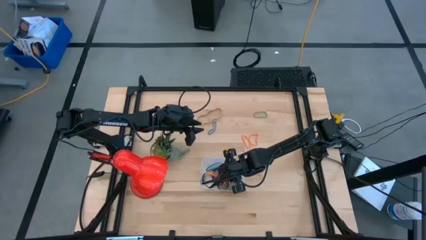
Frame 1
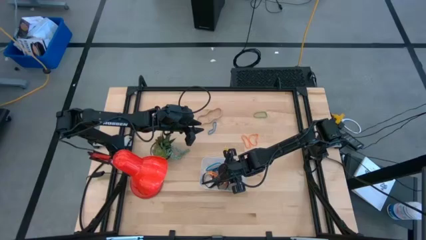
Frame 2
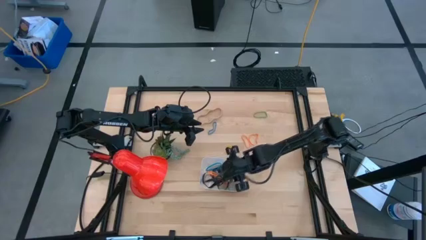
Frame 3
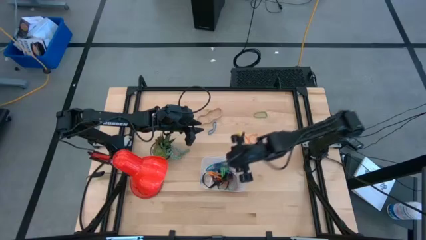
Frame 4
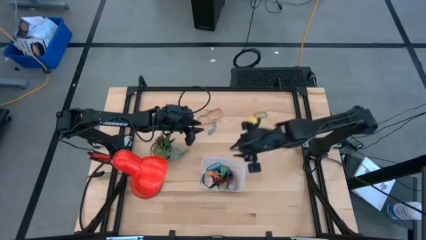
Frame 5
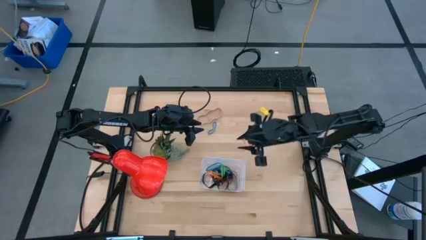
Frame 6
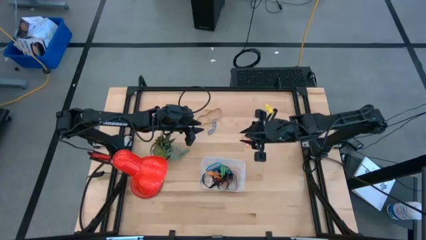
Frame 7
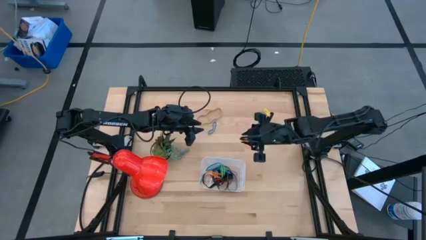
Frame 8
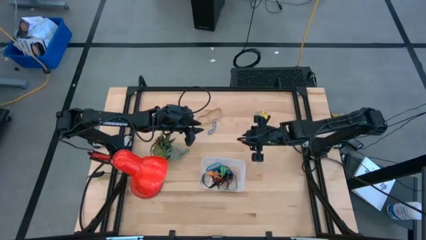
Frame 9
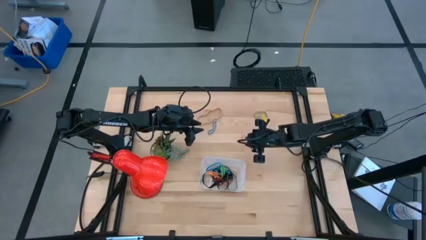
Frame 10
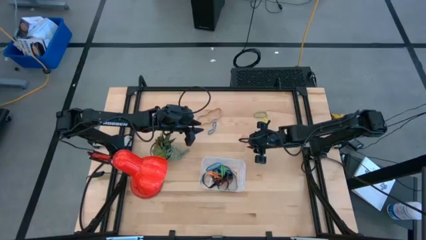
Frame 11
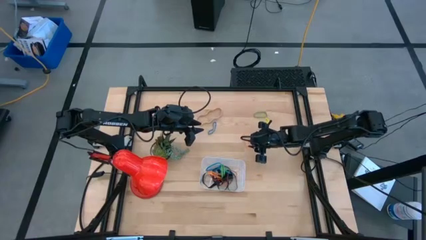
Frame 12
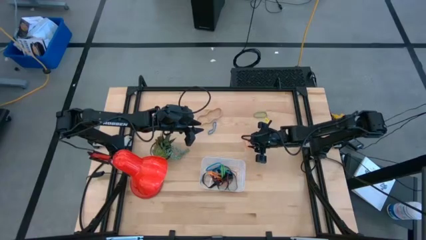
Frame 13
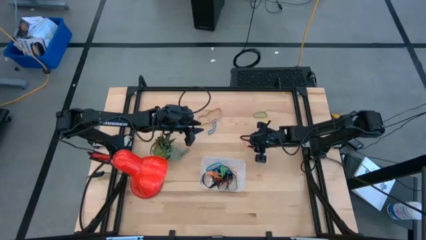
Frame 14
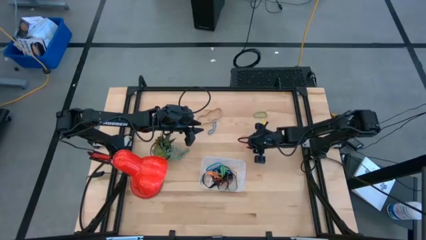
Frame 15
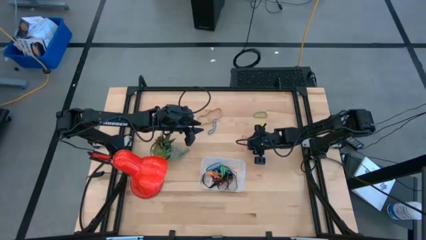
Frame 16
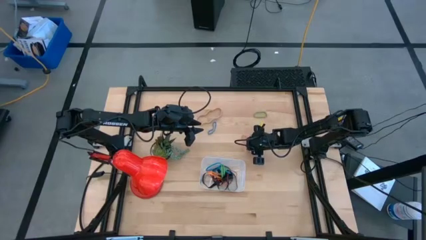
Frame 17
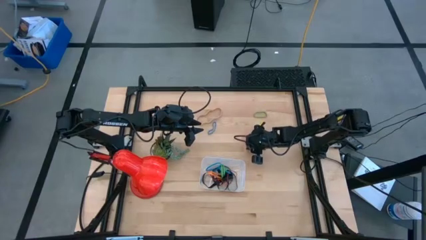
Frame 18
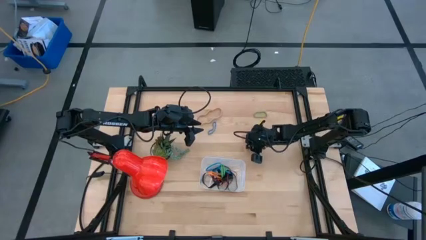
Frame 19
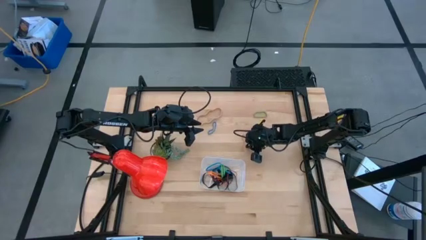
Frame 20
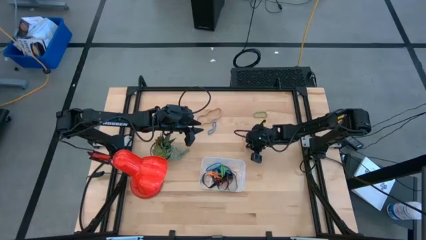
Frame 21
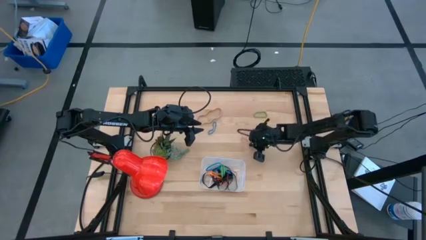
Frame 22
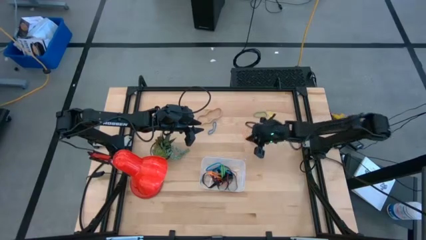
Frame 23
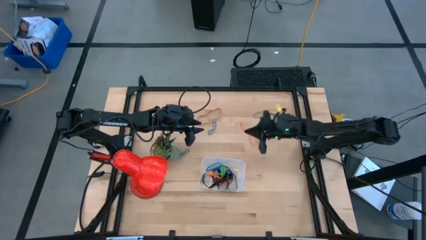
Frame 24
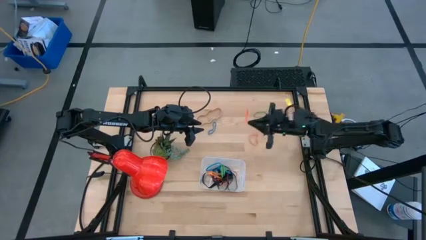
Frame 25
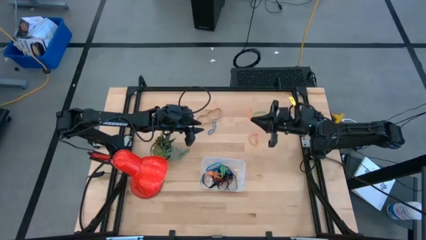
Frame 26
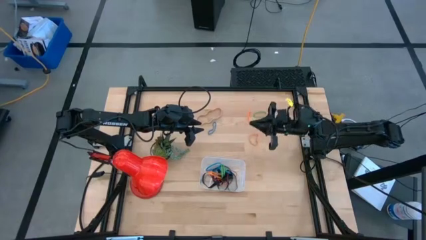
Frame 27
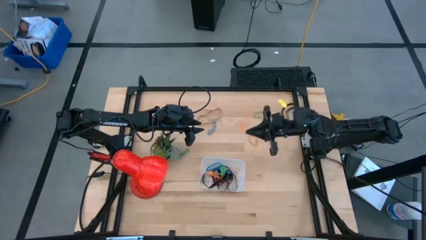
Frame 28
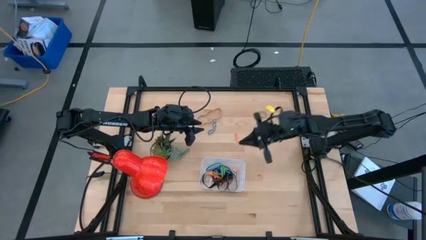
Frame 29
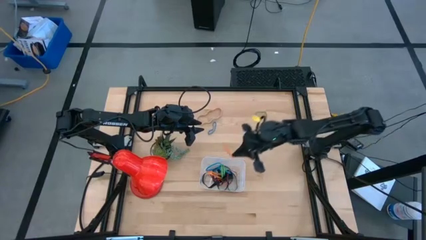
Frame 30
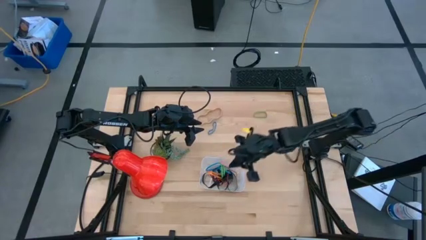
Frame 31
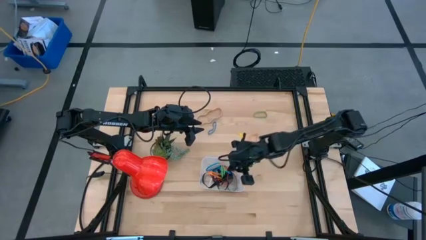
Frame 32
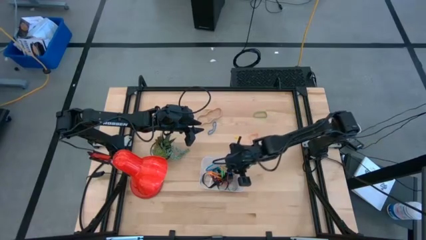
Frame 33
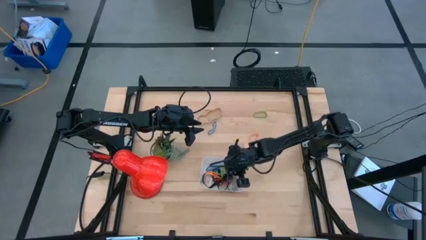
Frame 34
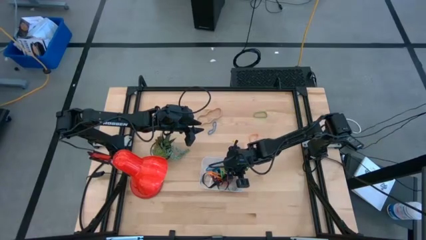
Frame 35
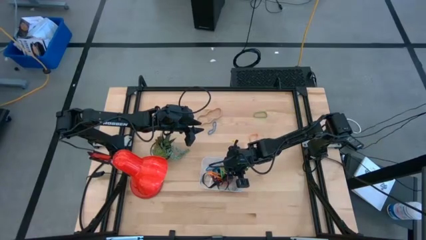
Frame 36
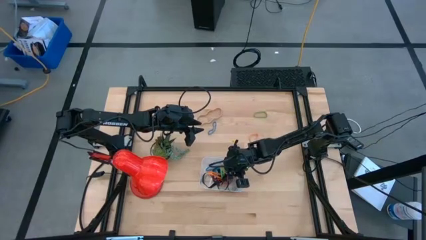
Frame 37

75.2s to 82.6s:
Task: Pick and place rubber bands into bin
Put the left orange rubber band into the bin

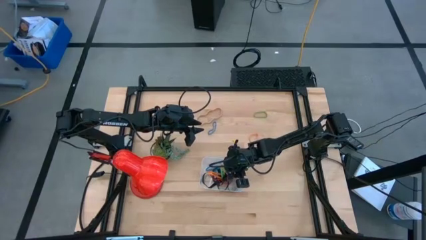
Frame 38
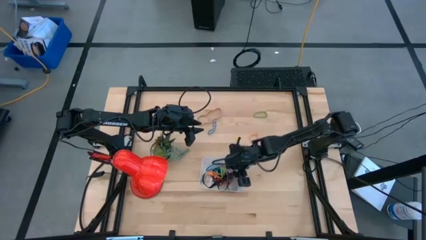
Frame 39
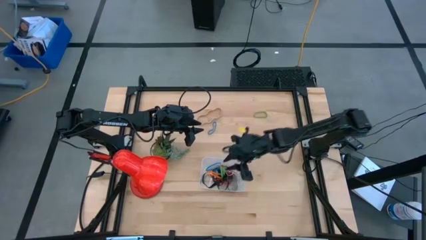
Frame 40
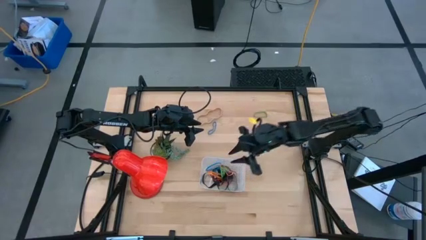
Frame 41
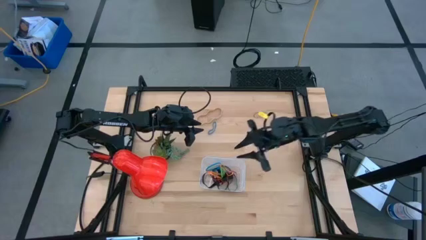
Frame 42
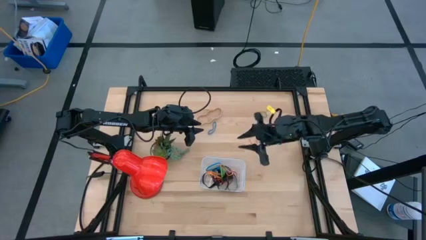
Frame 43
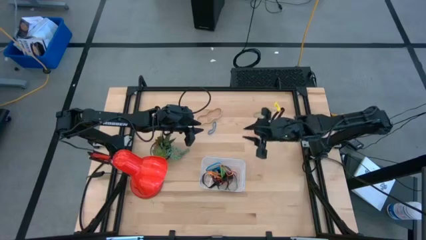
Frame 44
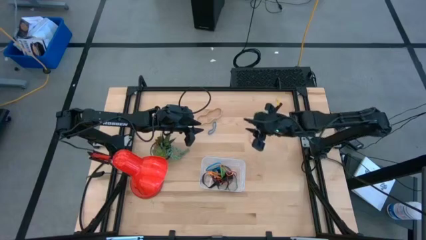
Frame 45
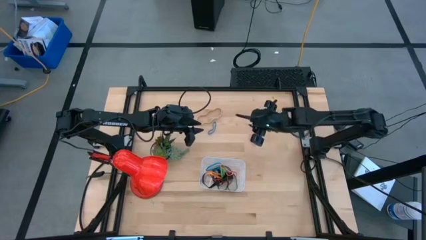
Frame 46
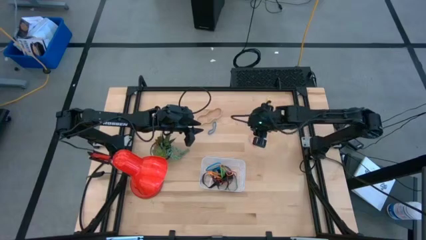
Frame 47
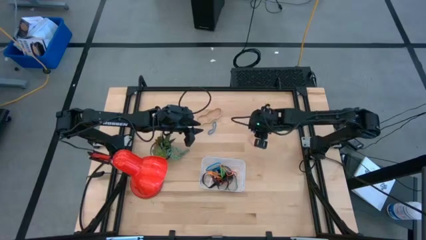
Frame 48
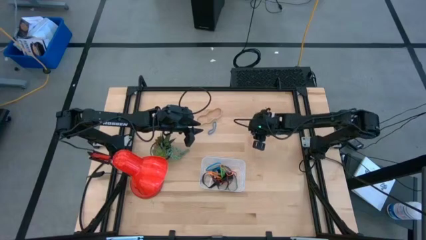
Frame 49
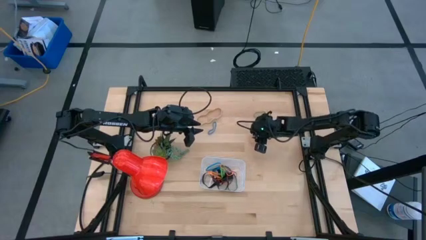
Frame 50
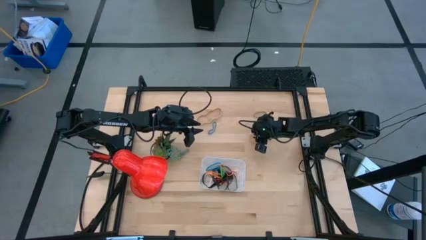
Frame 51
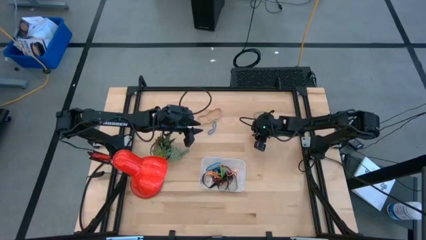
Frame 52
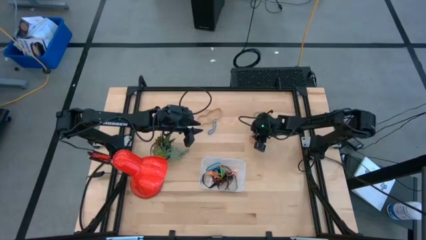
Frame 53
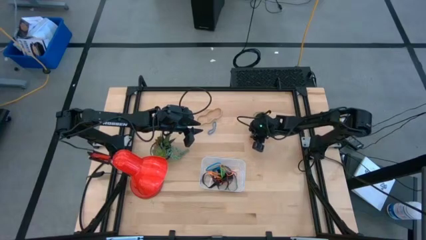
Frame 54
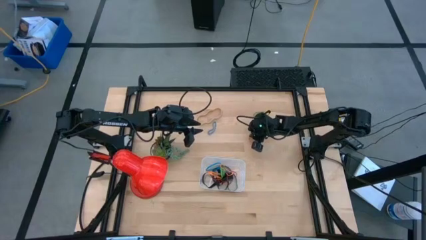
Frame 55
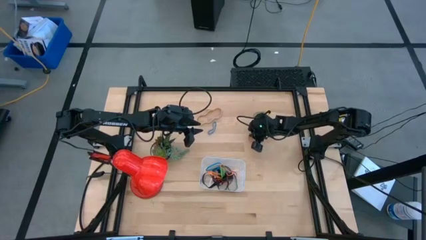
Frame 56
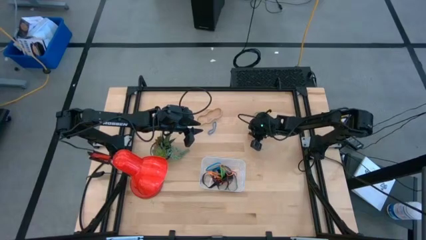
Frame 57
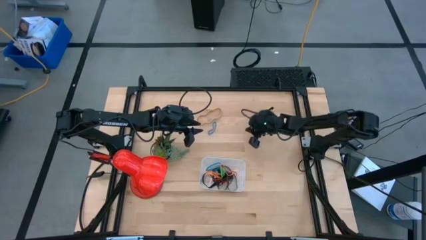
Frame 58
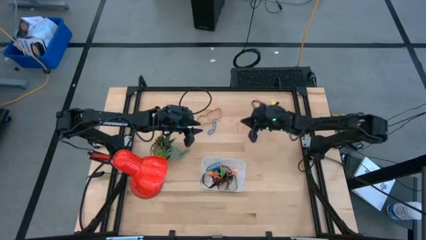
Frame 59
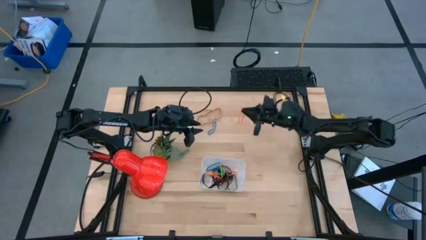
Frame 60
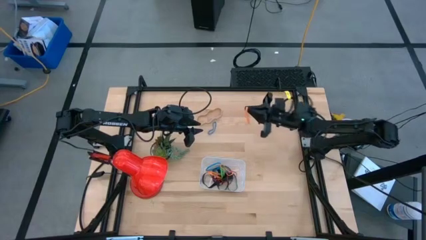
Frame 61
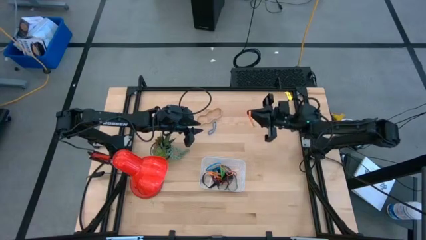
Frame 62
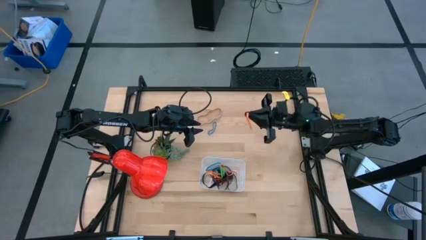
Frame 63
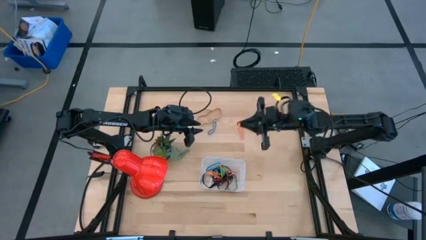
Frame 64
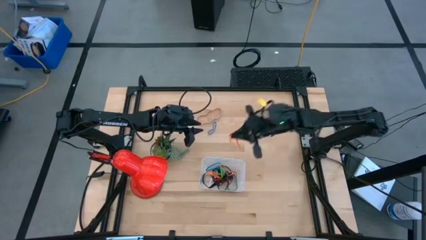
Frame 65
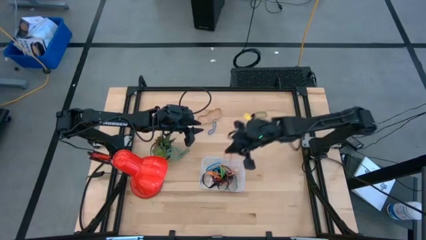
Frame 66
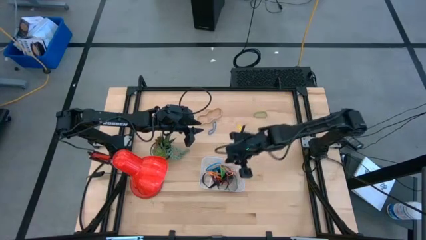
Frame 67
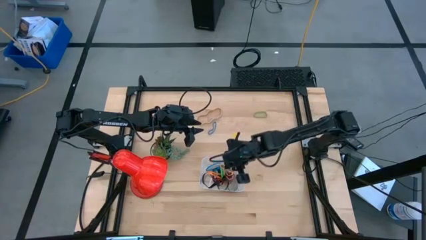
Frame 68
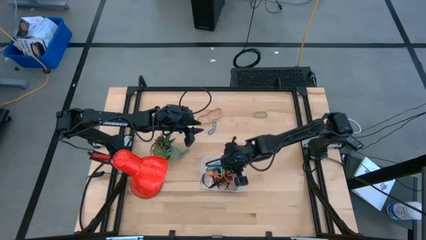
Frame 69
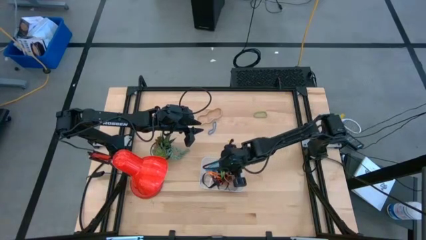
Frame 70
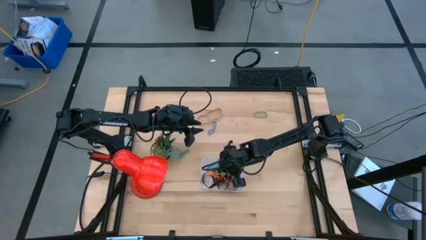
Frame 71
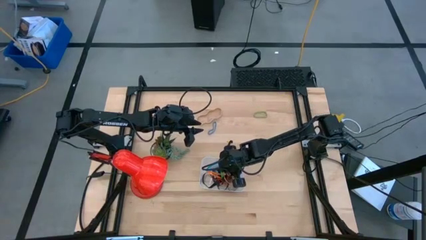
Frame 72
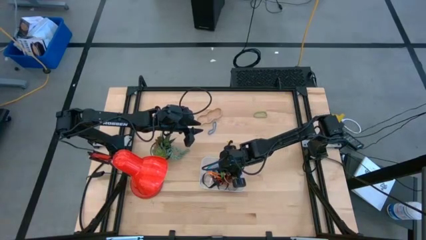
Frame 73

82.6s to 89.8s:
Put the orange rubber band into the bin
